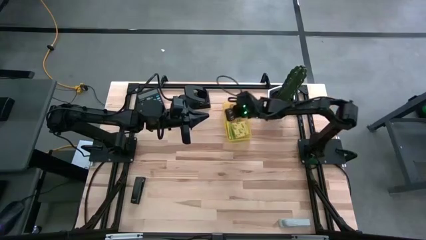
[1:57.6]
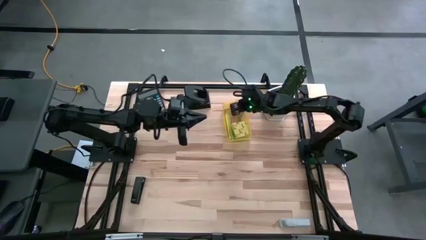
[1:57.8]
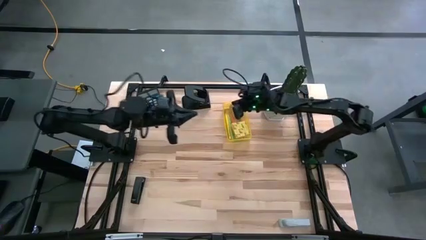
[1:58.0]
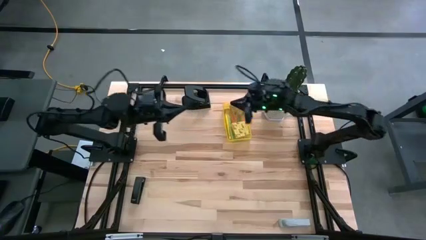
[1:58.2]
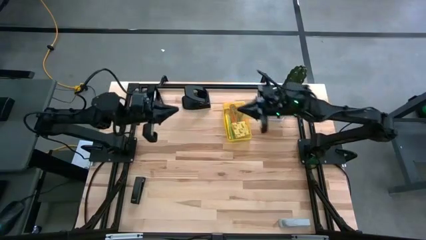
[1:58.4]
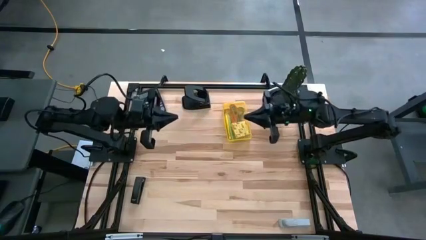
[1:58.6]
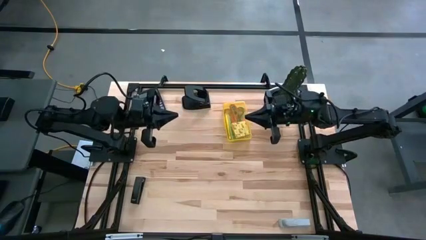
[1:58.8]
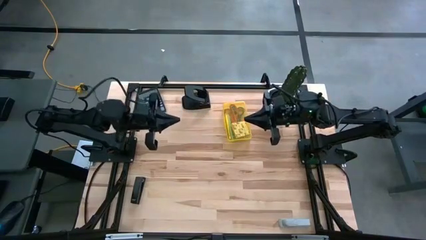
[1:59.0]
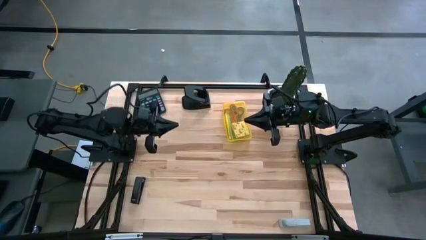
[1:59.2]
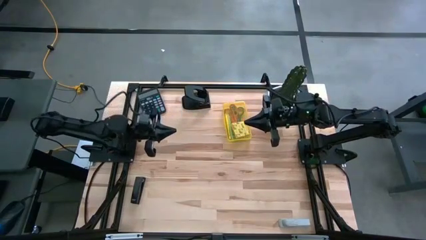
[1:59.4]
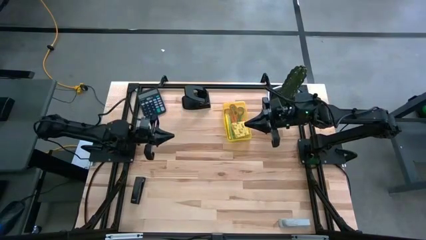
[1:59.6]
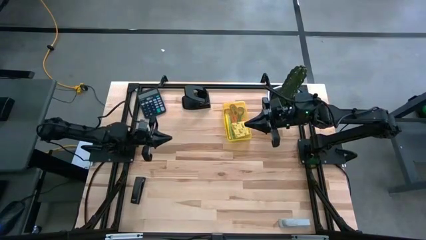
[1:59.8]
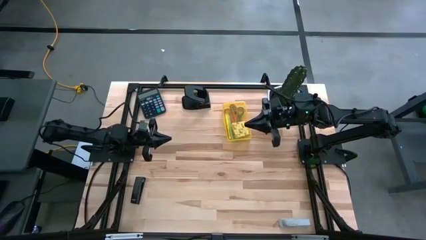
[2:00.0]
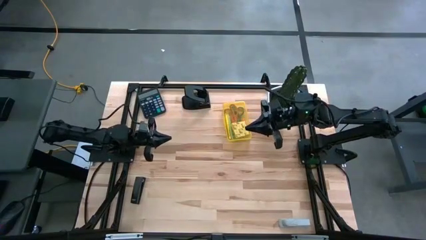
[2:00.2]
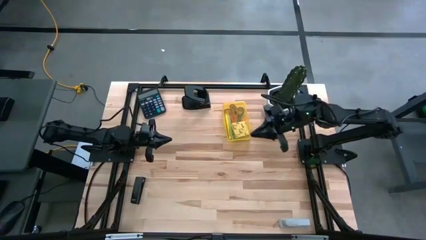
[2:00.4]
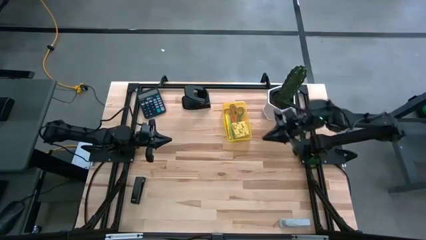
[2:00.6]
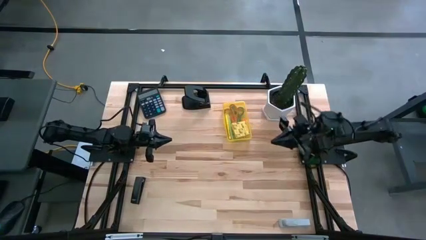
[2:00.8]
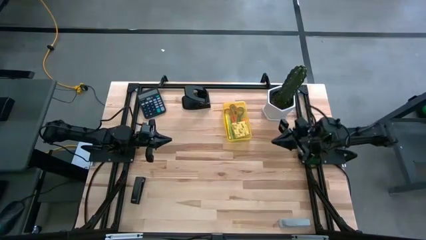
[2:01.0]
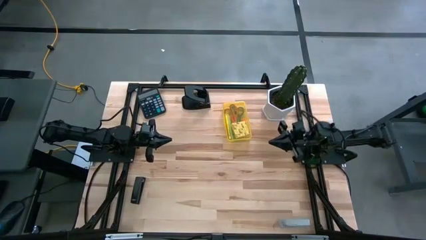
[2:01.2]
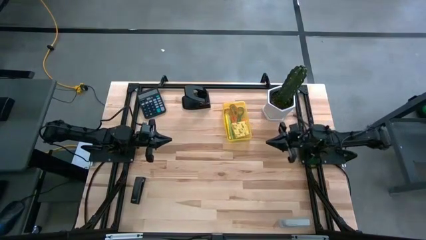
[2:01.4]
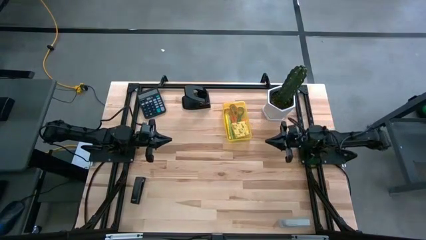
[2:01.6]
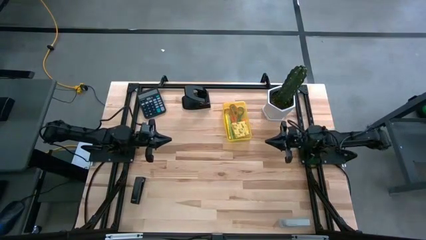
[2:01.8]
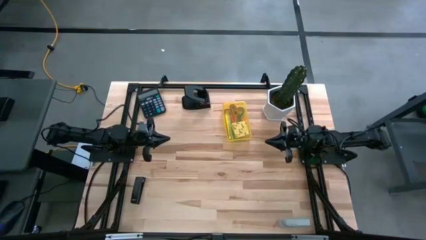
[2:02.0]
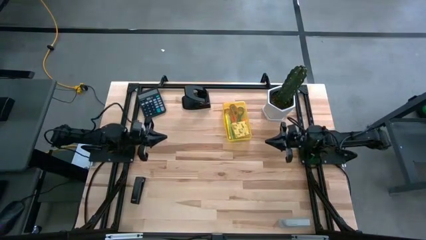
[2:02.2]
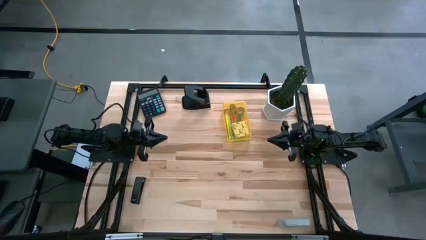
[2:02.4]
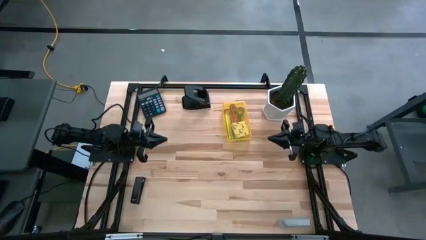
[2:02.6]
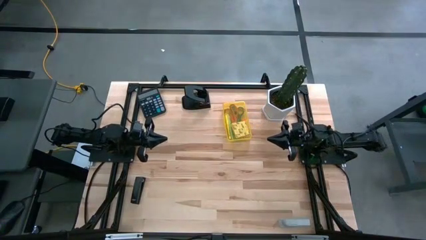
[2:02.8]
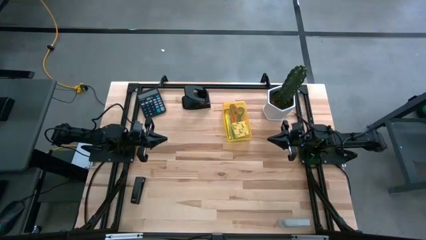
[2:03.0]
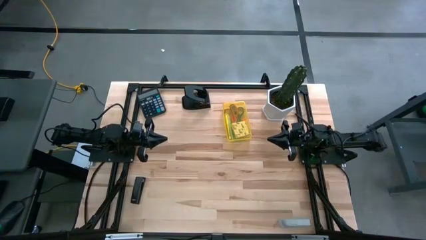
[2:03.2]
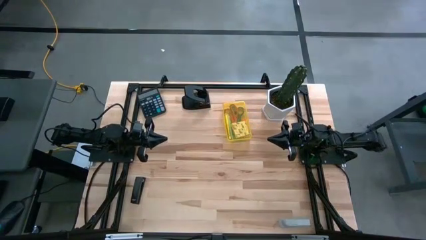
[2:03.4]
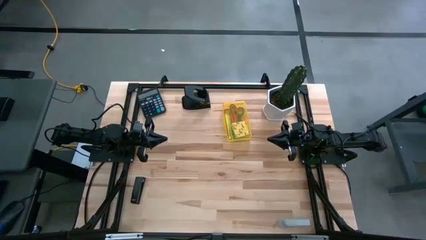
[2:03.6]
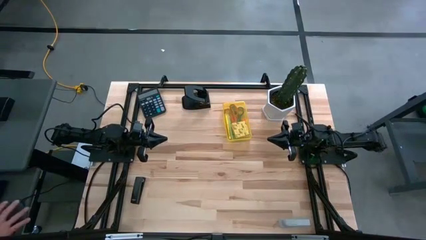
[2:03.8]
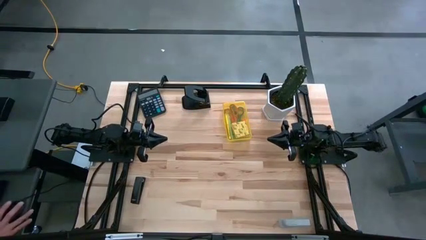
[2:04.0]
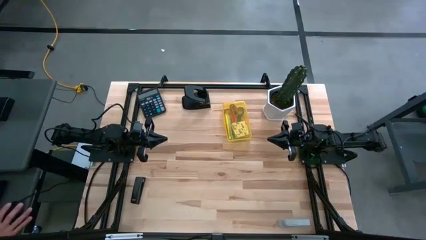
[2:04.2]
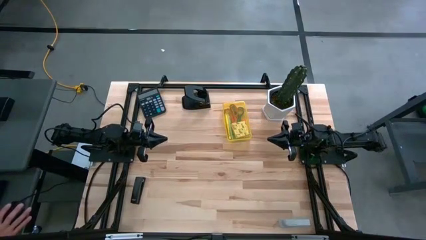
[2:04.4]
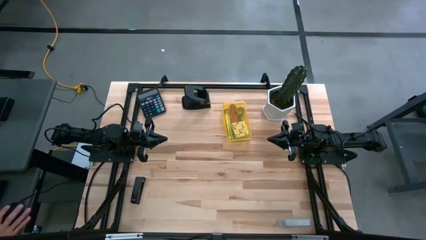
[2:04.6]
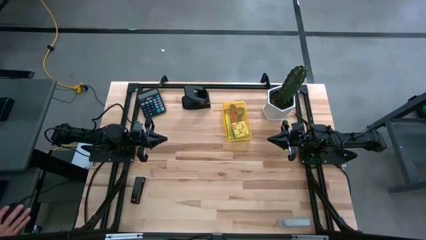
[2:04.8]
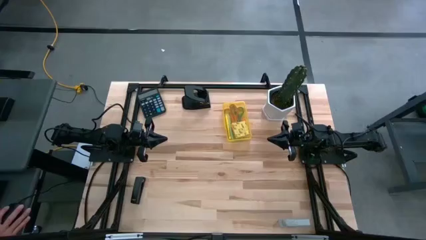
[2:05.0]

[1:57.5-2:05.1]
Task: Pack school essentials
Return to Home Position

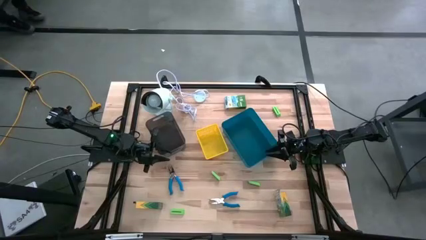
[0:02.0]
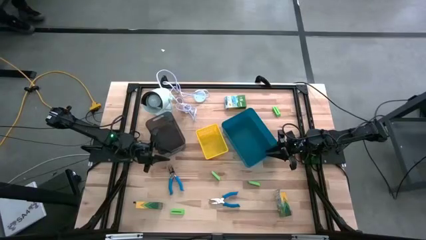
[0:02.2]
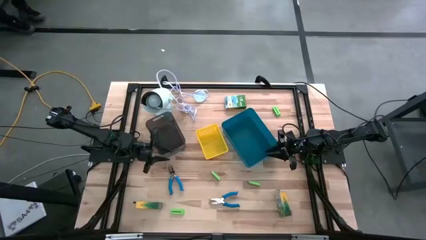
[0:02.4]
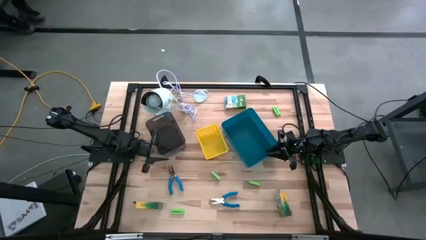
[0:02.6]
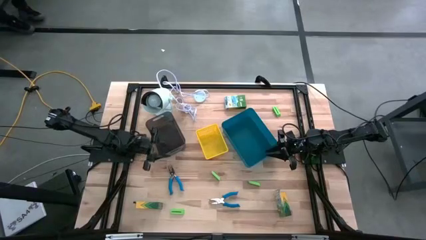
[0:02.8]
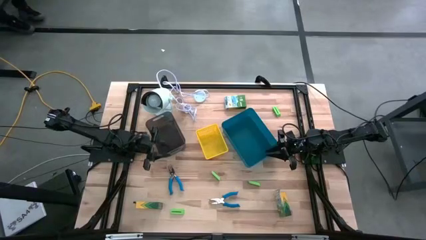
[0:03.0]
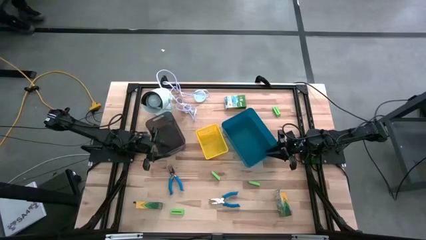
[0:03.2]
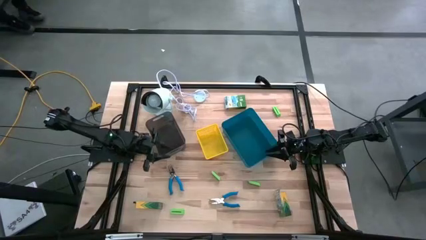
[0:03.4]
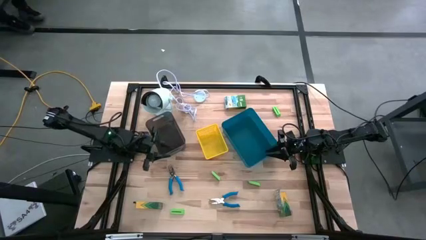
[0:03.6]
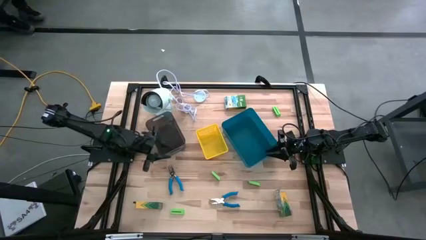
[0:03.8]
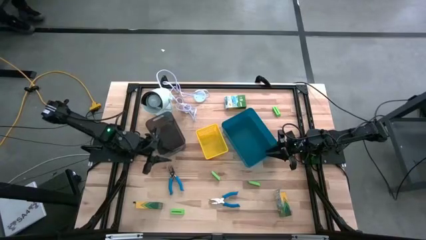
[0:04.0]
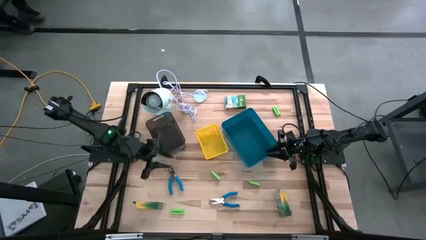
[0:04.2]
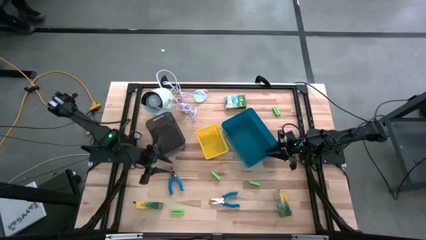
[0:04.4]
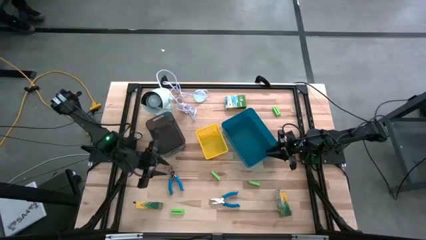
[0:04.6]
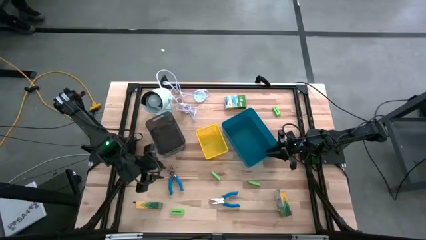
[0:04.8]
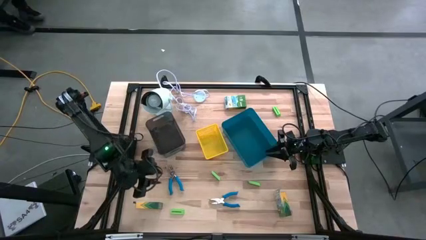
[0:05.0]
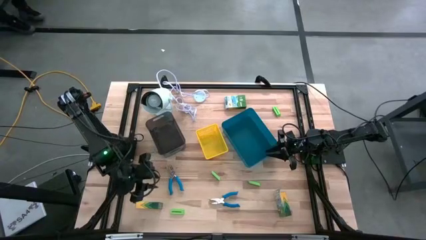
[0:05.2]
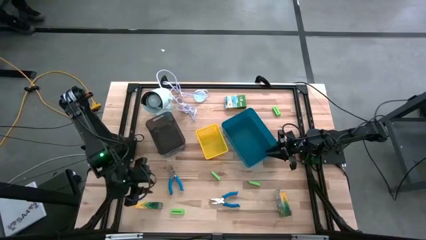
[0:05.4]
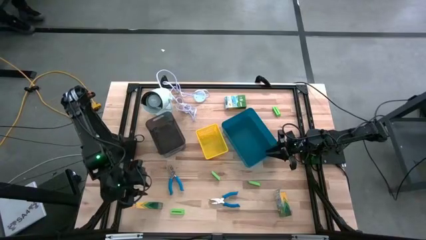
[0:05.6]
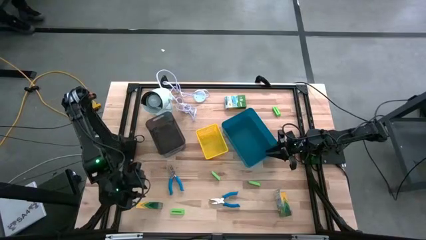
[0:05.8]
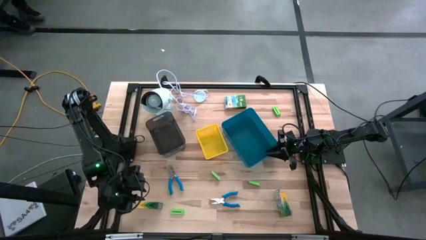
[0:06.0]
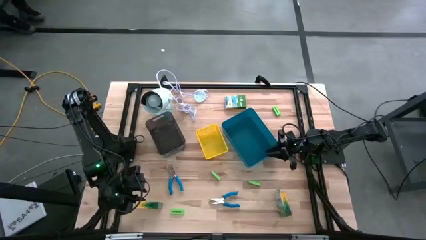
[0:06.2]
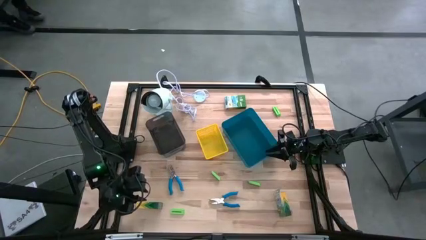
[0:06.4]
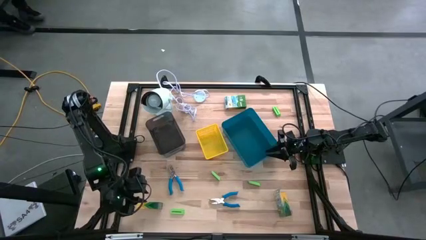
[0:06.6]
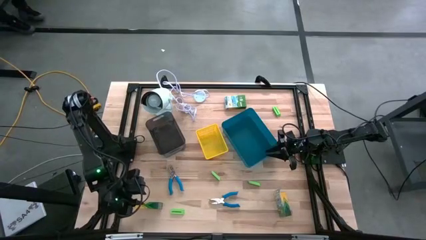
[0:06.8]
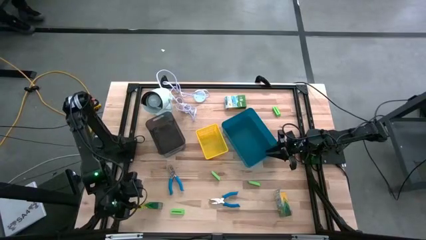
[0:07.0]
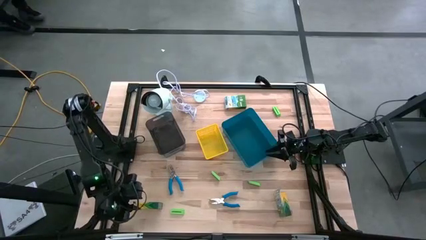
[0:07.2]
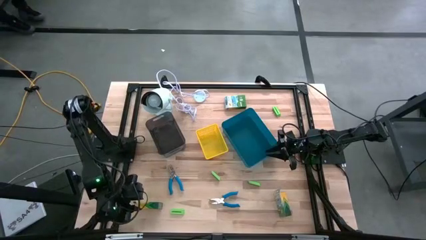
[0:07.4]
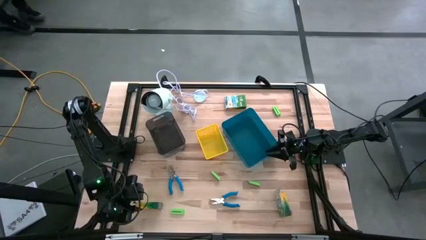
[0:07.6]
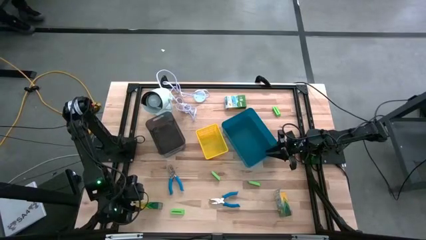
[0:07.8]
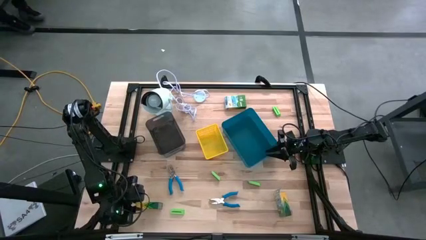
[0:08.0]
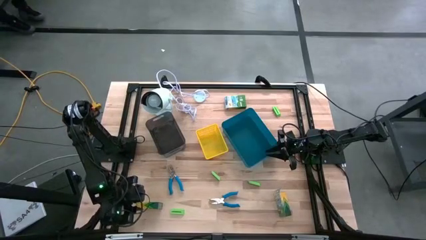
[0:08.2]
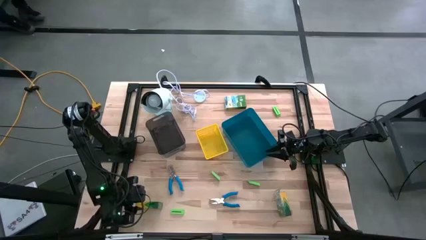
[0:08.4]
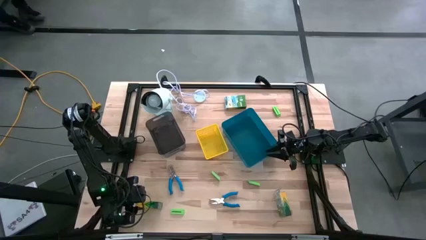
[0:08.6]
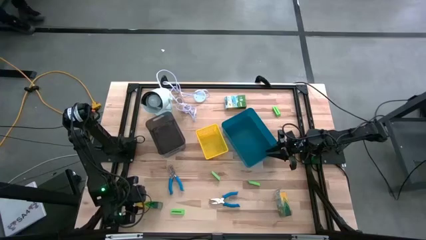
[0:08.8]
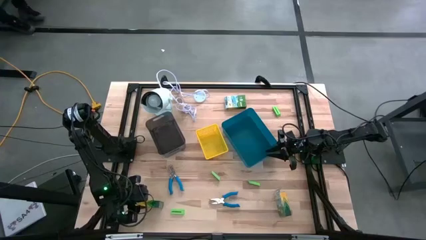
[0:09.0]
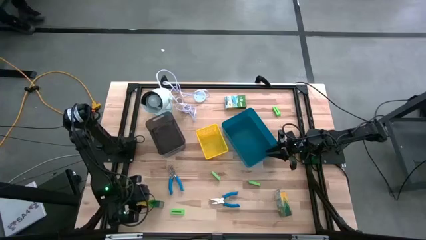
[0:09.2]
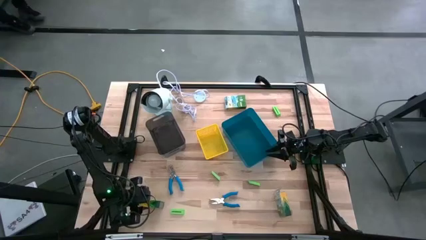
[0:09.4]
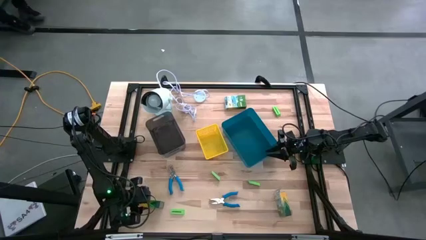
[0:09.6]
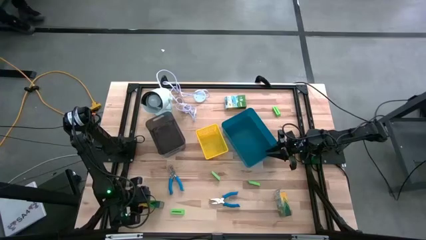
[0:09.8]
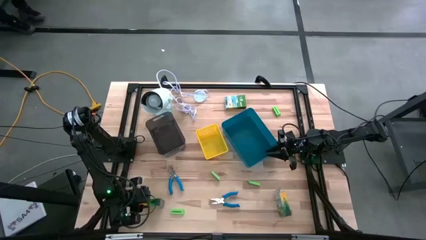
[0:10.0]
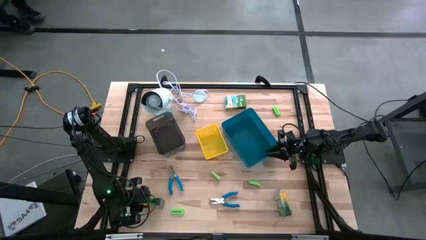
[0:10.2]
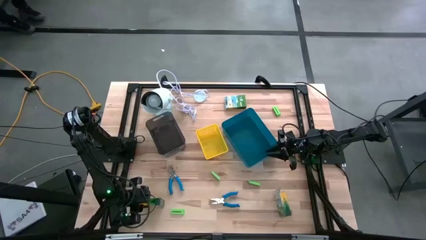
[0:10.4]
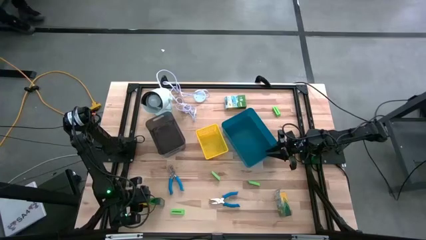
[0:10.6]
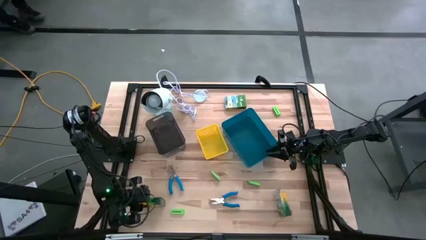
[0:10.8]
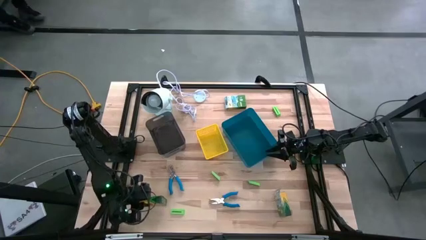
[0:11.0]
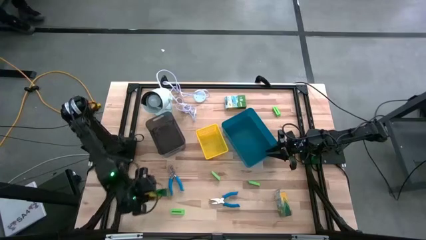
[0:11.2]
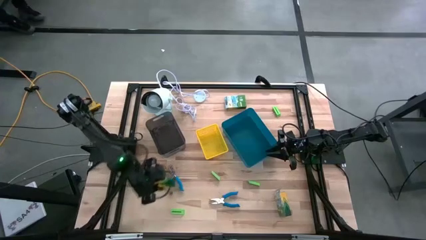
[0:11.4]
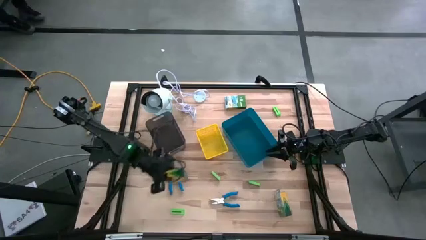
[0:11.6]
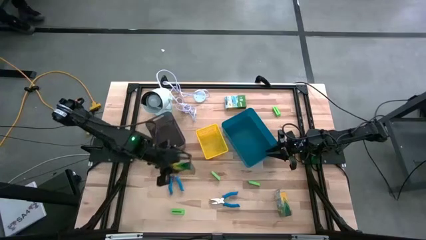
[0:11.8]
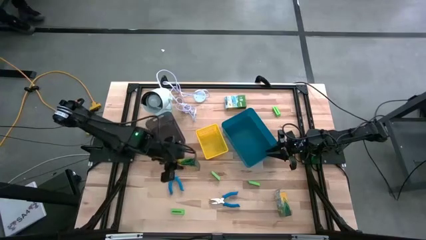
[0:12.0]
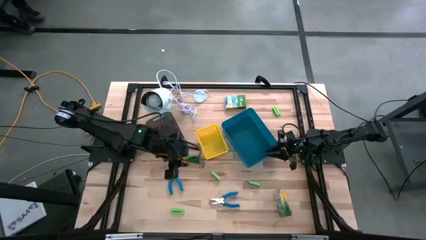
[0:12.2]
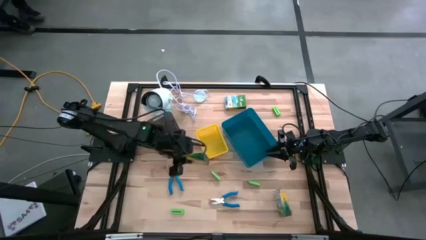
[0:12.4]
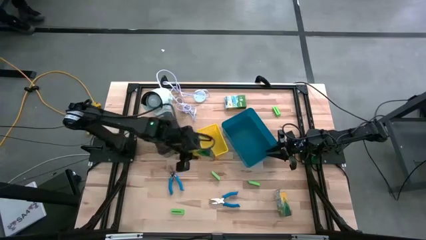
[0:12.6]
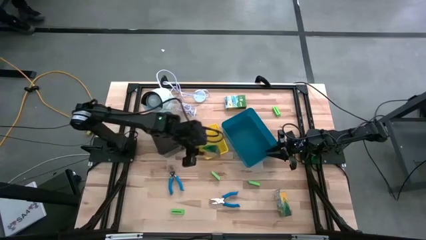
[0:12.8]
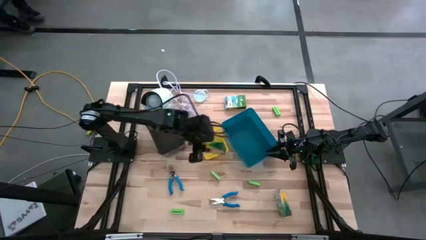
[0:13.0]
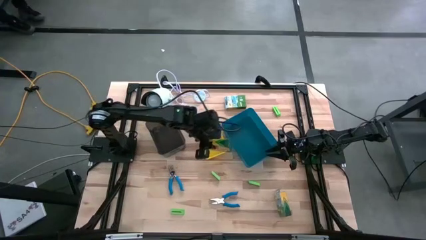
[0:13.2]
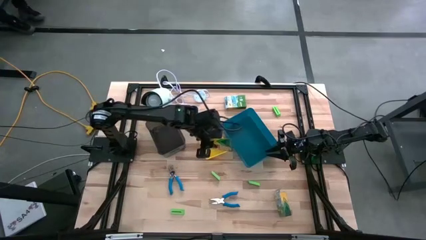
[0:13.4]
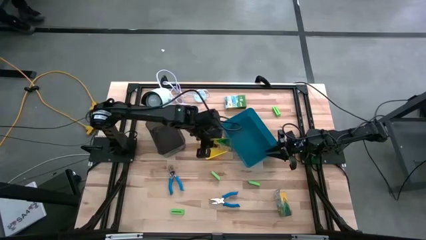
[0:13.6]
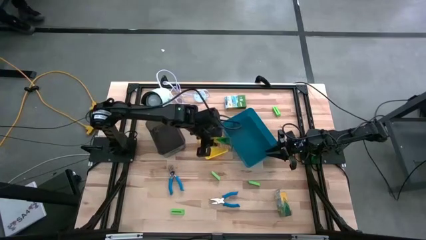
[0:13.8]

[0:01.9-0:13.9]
Task: Pick & Place School Supplies
Put the crayons box into the blue bin
